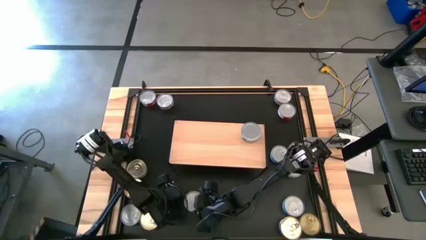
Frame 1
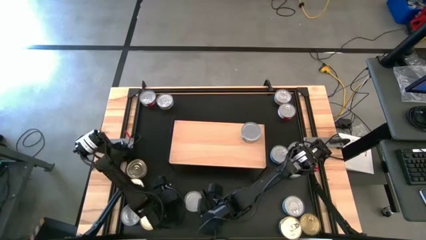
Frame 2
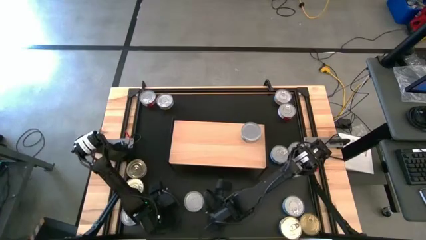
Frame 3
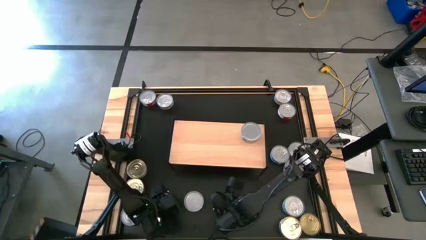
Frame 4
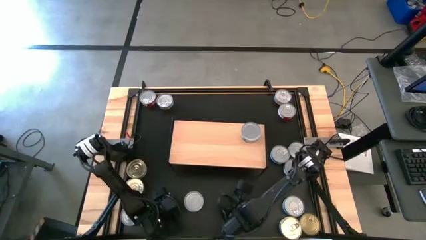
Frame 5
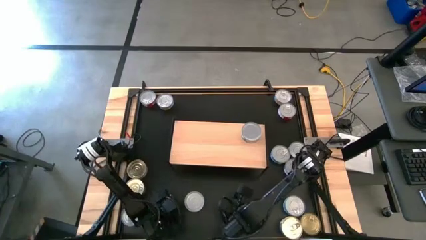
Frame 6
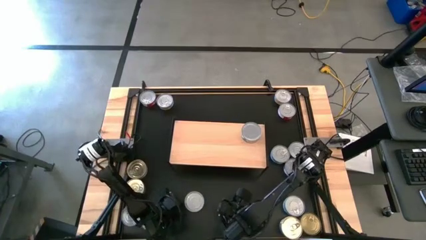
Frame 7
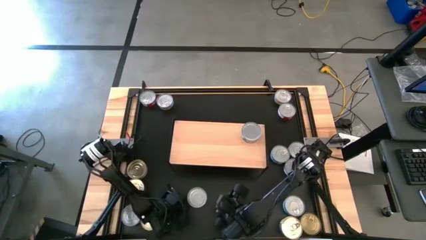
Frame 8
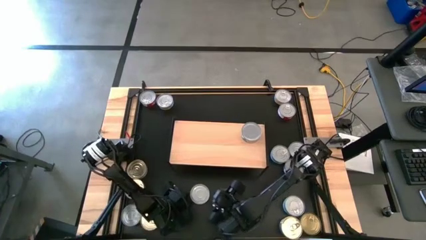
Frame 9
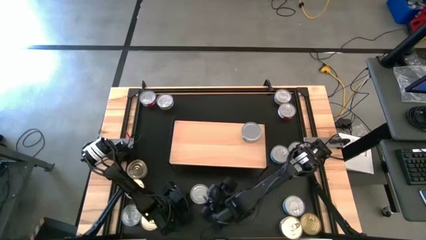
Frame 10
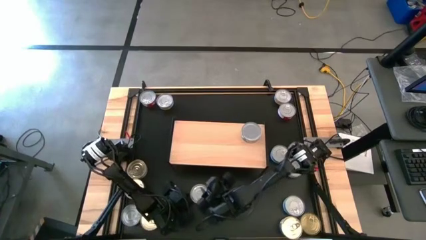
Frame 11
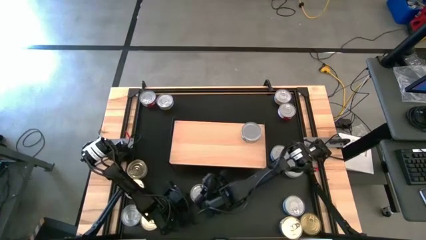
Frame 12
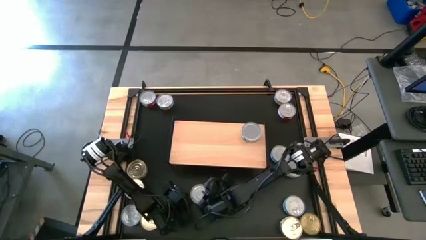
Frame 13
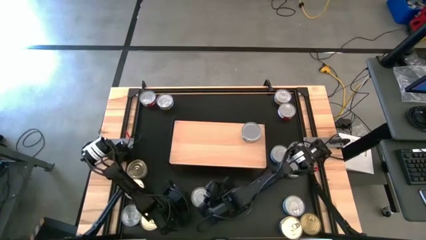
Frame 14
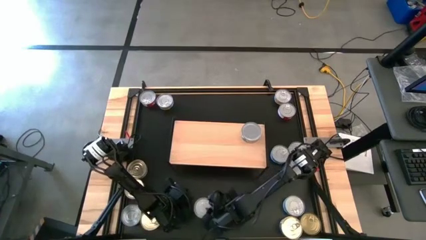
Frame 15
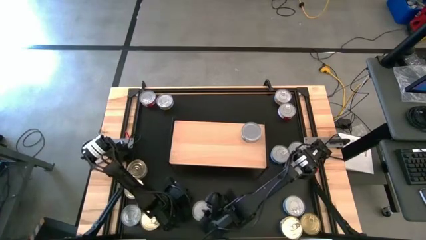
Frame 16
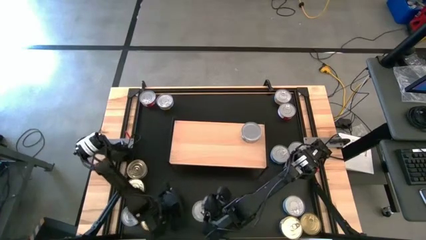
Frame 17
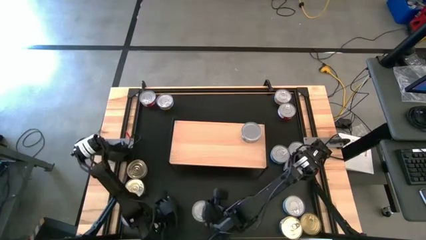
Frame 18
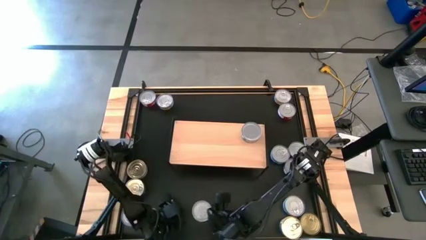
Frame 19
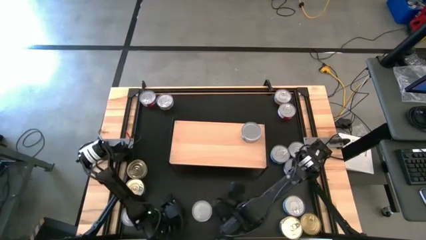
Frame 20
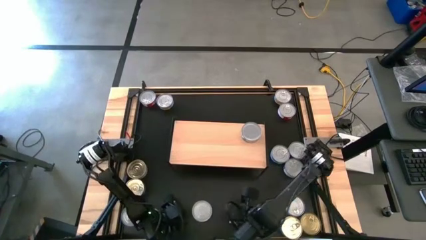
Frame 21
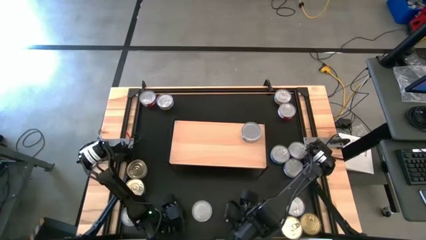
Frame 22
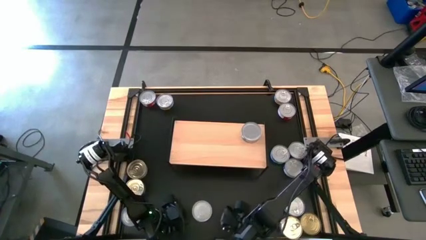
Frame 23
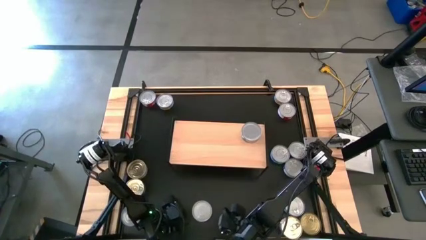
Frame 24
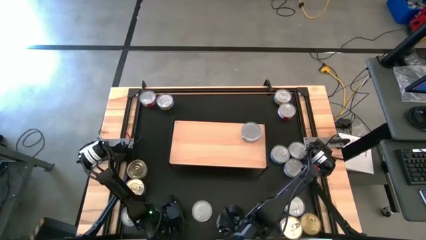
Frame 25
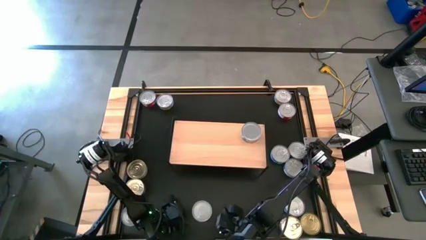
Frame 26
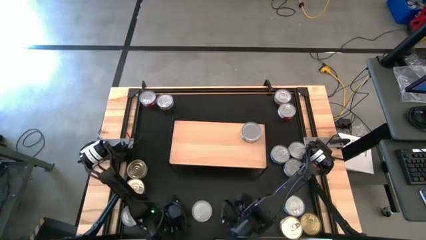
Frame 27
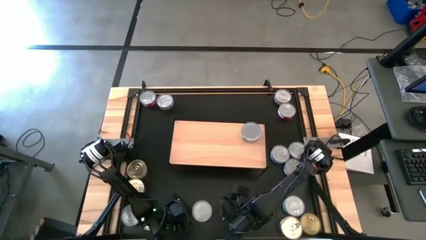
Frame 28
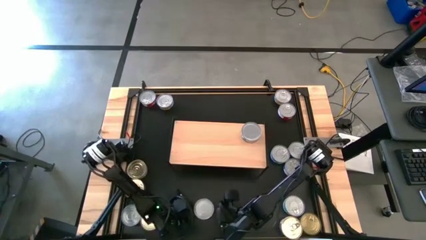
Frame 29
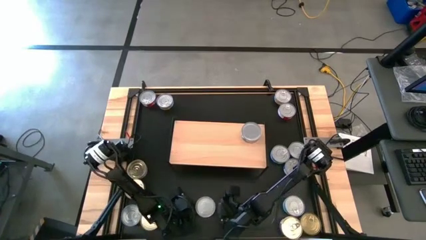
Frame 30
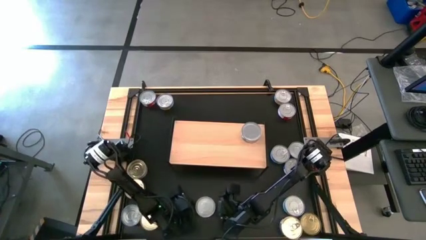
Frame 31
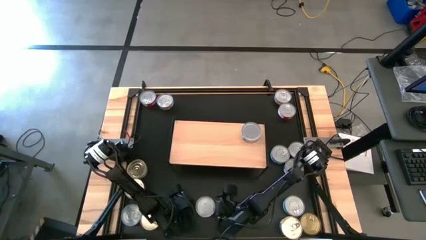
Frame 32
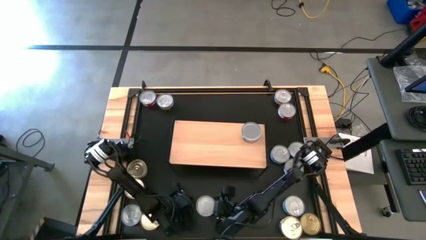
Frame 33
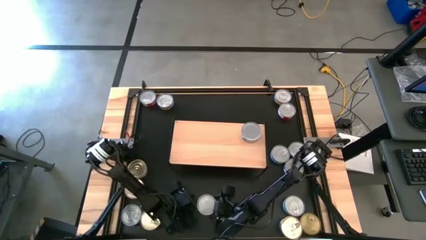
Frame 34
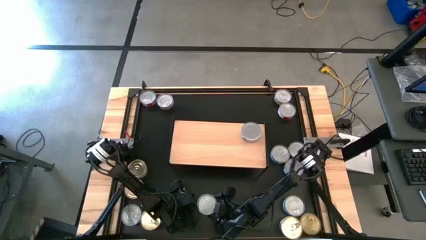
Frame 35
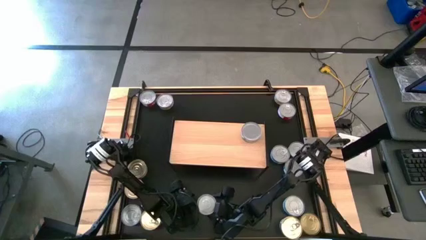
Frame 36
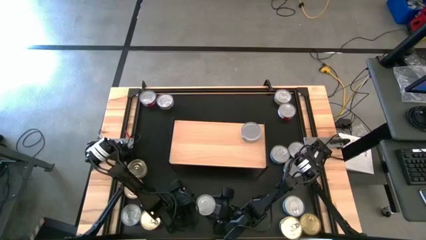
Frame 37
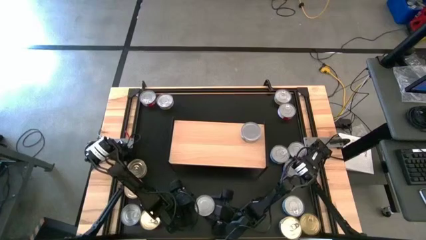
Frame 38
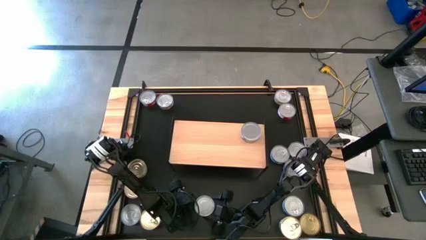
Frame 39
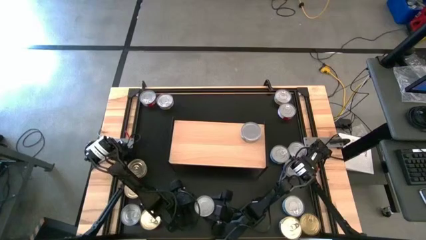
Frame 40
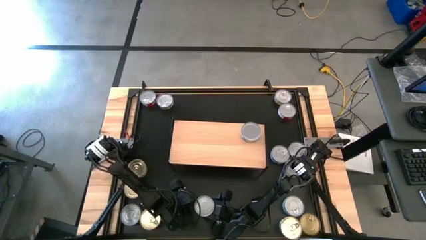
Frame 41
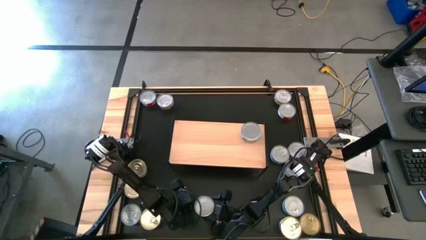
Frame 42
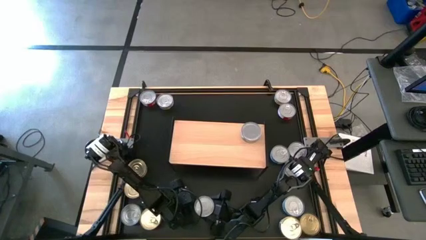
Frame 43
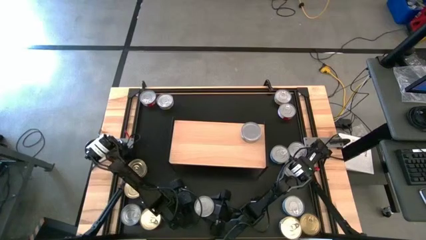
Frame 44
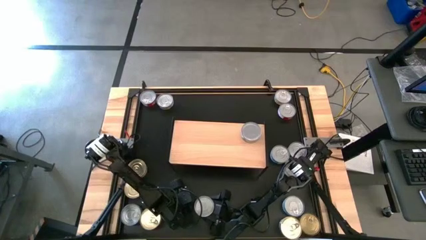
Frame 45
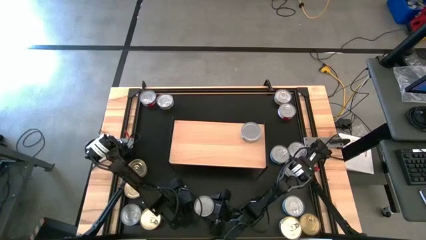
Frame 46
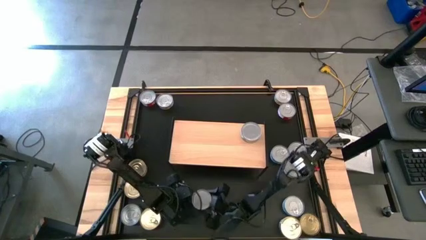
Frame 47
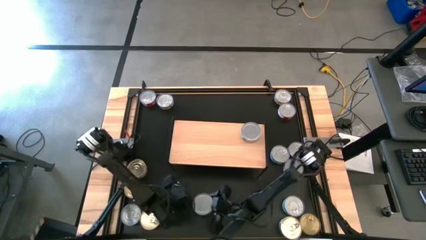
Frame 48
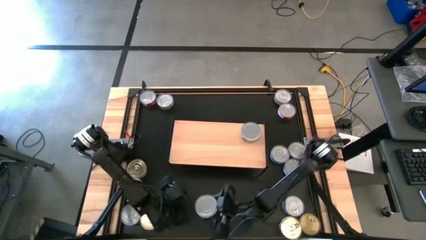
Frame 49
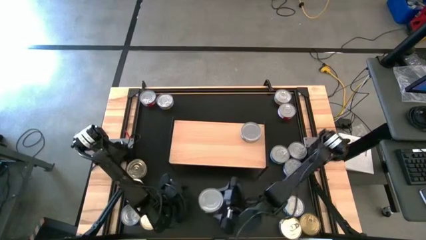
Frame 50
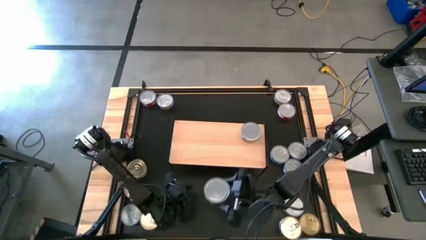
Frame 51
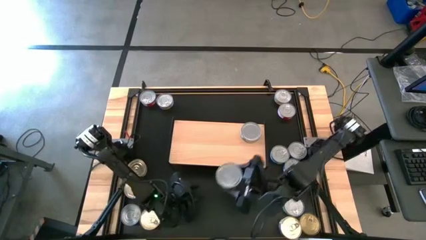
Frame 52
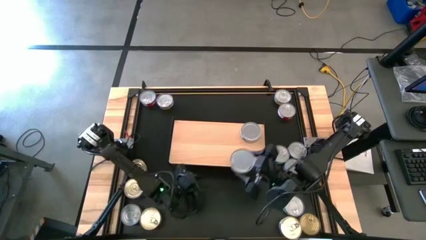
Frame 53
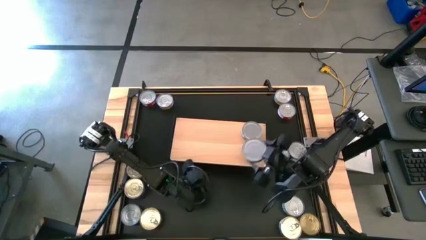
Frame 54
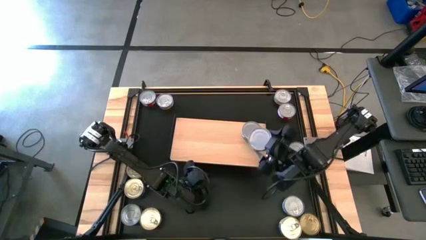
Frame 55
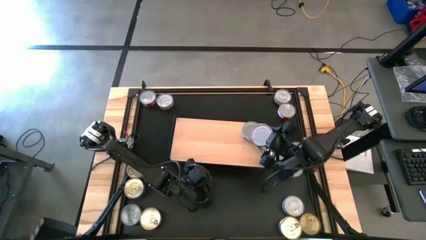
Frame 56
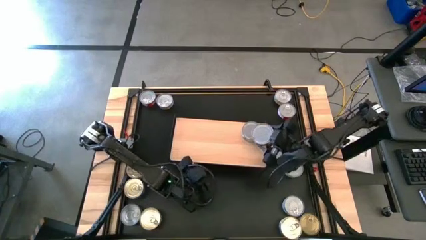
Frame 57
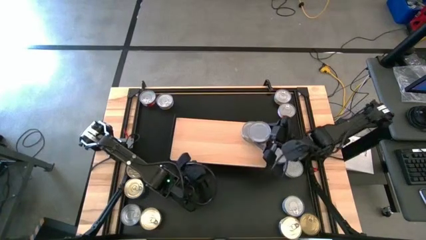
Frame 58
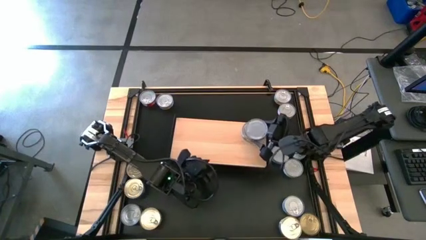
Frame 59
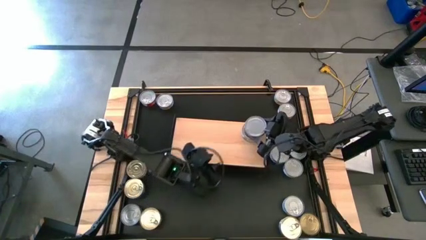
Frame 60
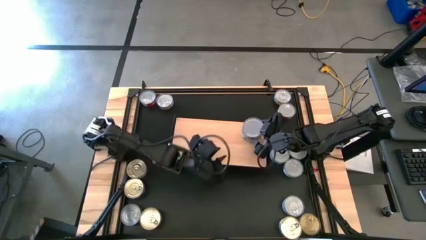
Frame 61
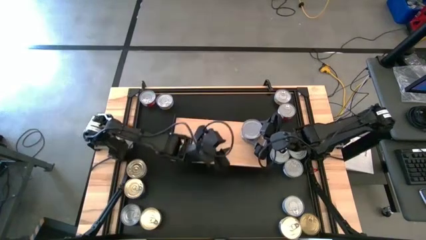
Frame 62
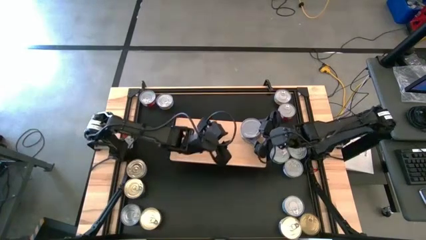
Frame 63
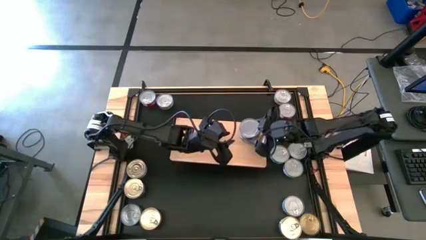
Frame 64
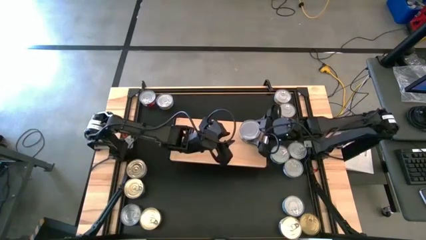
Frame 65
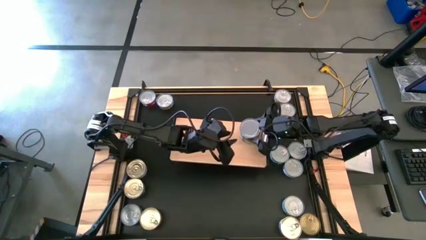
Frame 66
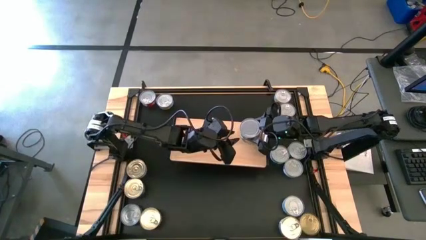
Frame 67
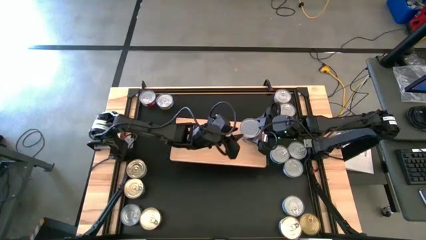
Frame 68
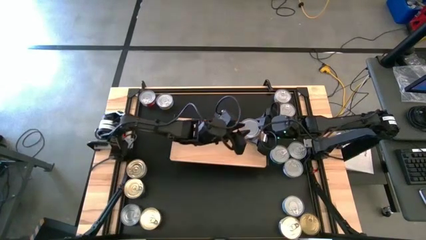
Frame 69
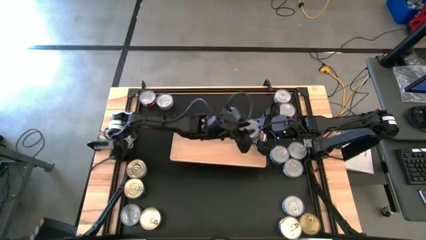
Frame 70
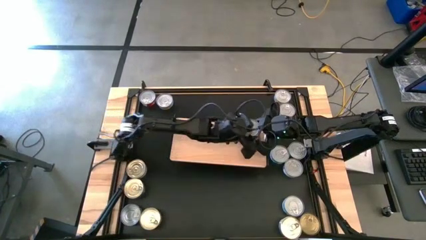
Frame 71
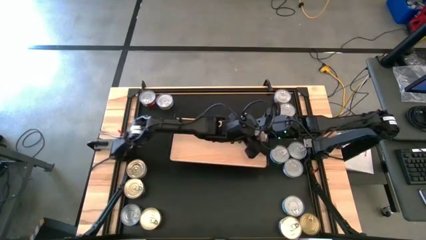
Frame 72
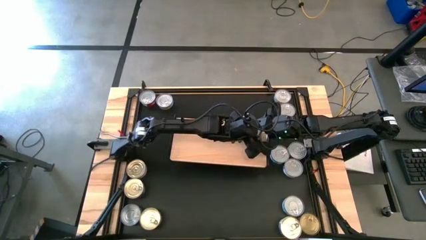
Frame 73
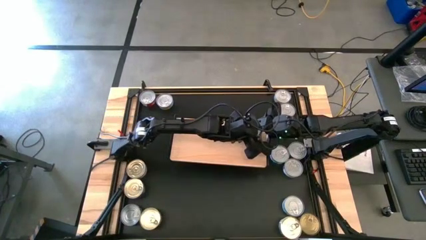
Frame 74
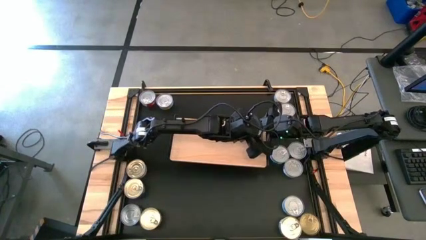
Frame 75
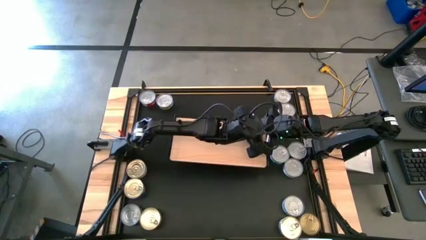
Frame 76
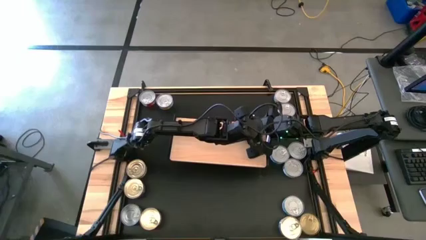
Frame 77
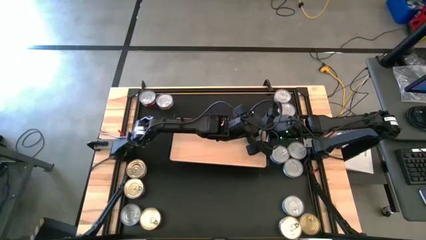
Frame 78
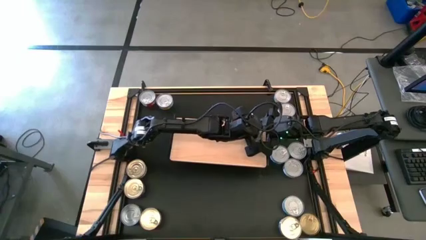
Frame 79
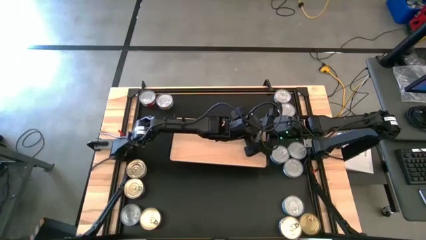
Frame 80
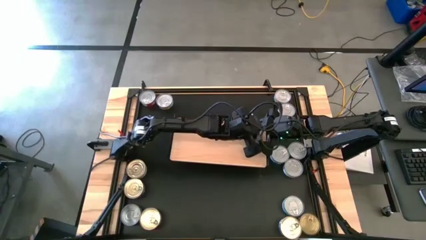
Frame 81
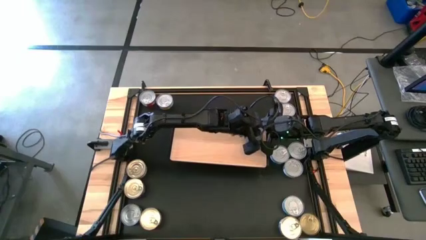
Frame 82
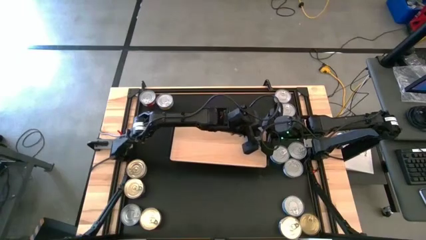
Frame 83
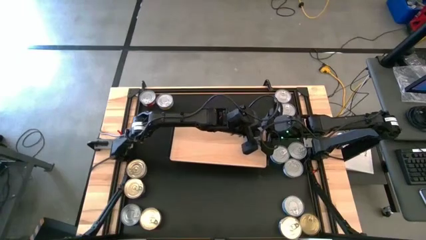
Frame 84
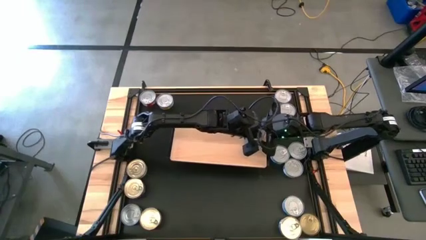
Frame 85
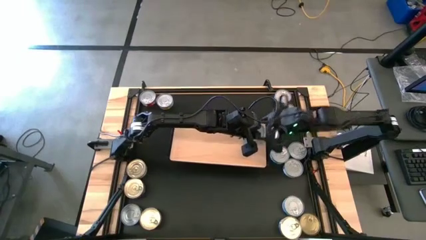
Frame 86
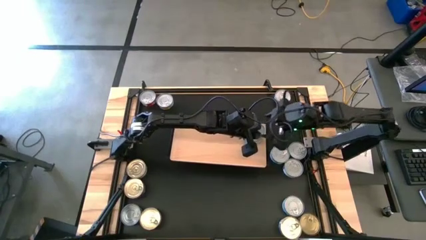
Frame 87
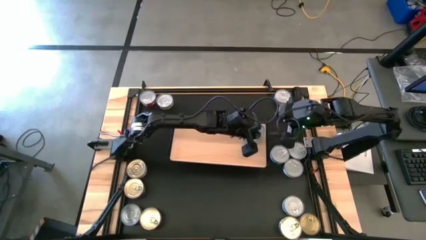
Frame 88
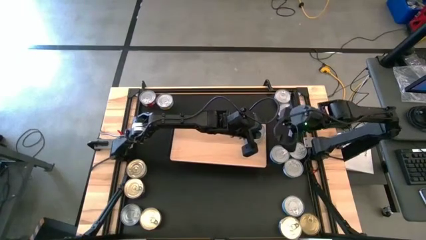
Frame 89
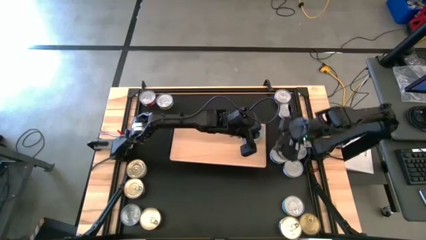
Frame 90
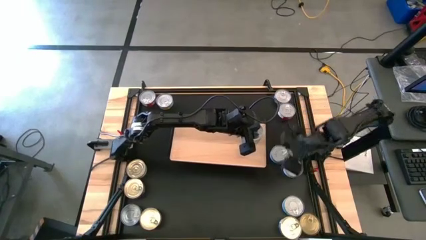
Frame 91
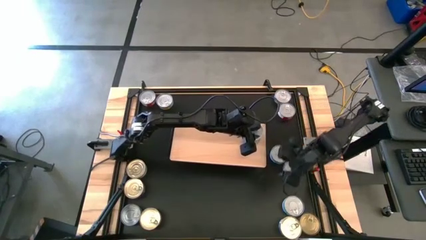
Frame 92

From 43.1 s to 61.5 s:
Task: Stack canned seafood by type on shelf
Stack the green white tuna can on top of the green white tuna can on the shelf
